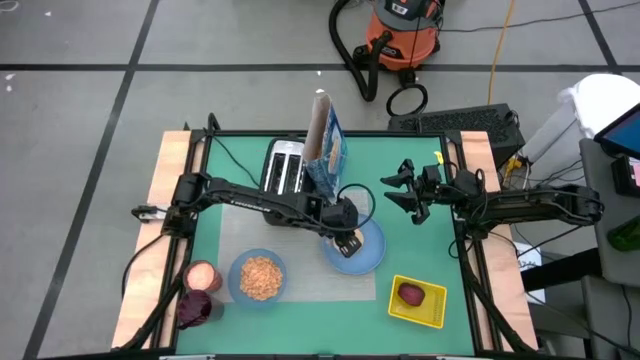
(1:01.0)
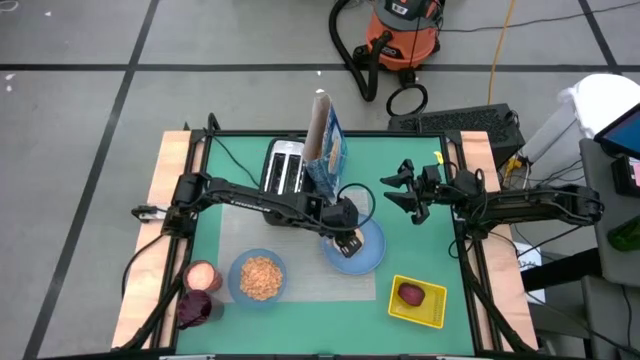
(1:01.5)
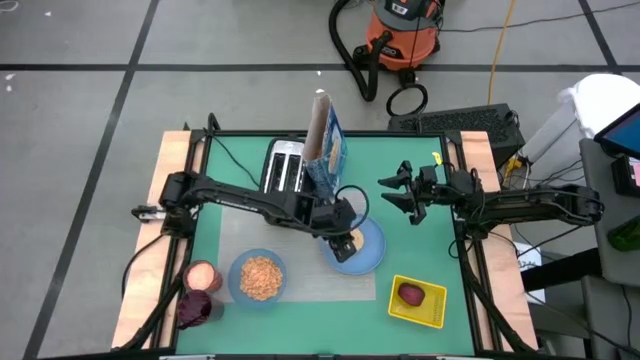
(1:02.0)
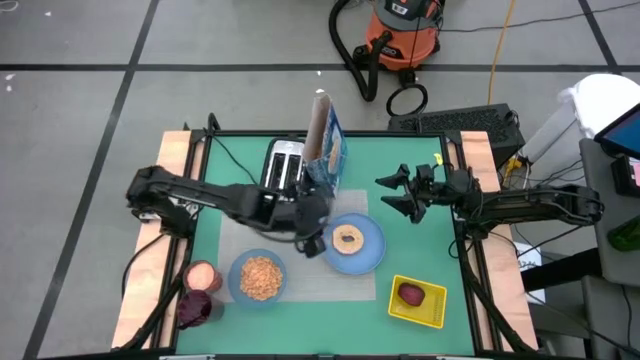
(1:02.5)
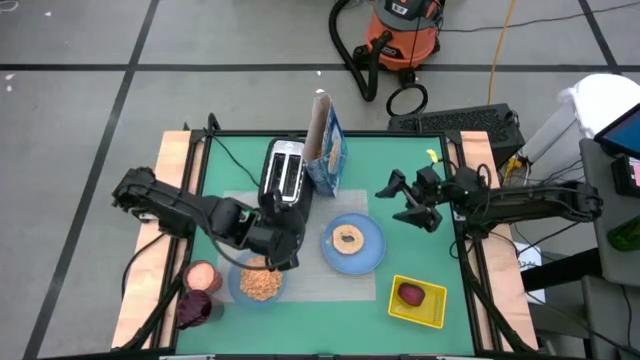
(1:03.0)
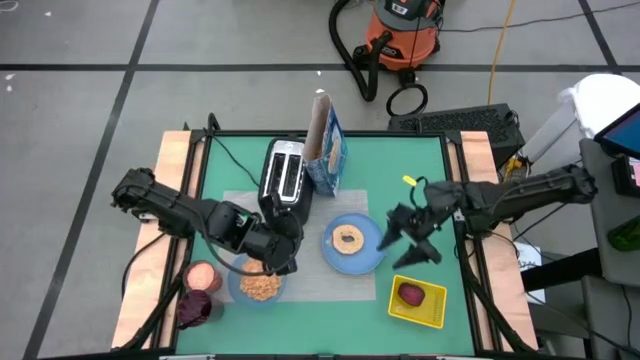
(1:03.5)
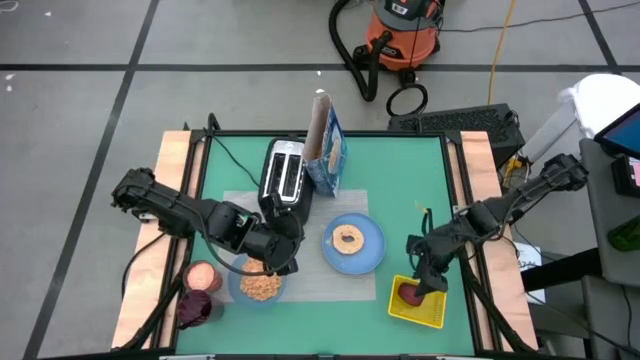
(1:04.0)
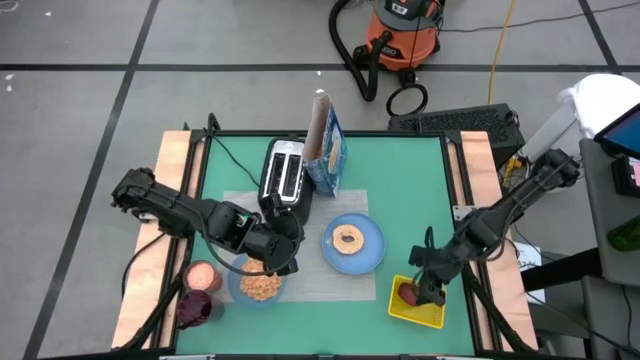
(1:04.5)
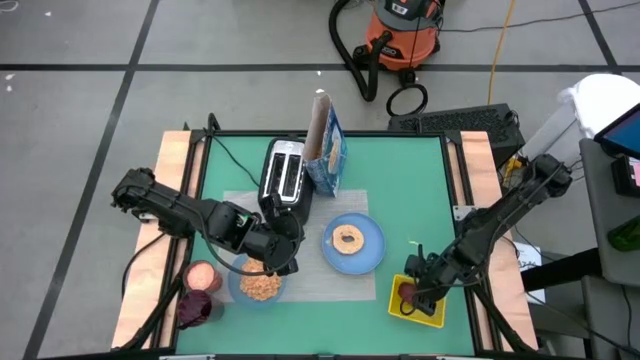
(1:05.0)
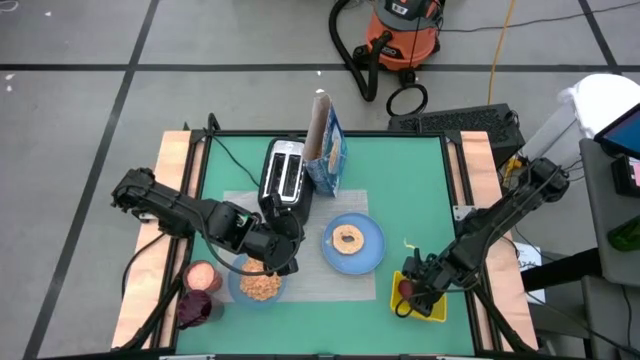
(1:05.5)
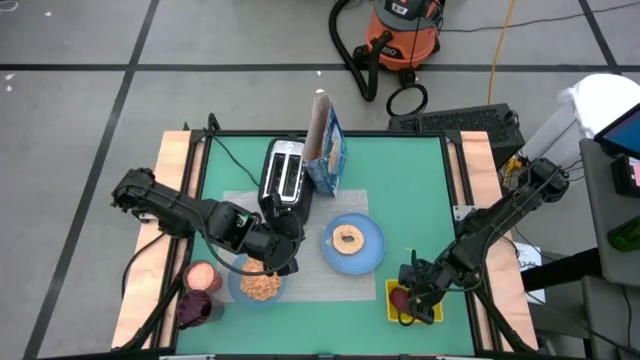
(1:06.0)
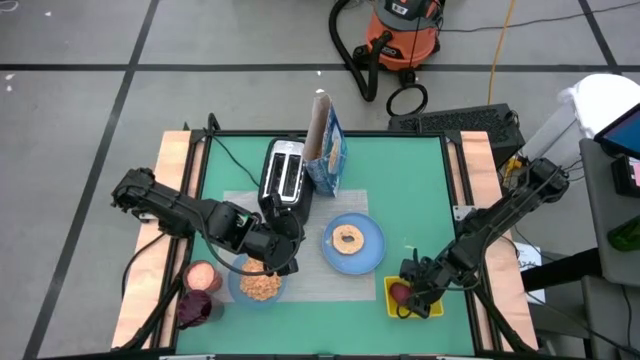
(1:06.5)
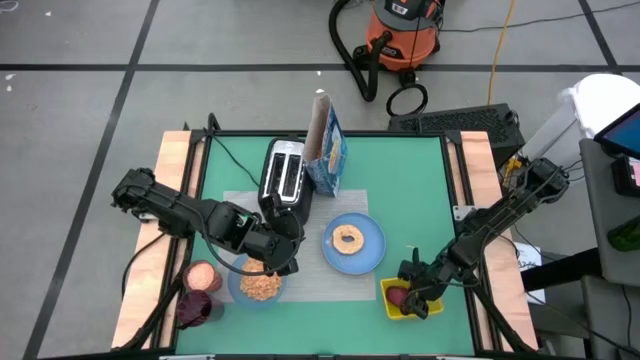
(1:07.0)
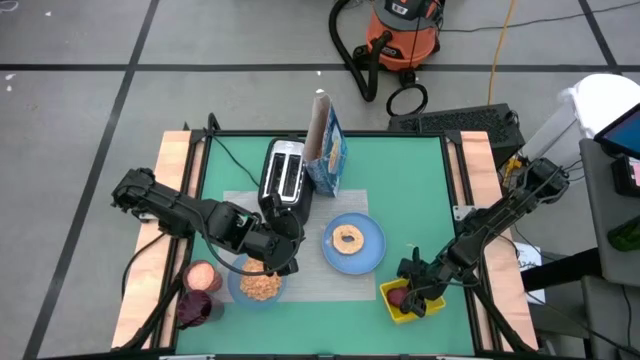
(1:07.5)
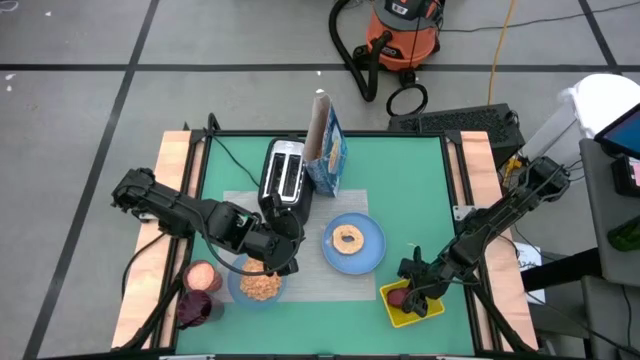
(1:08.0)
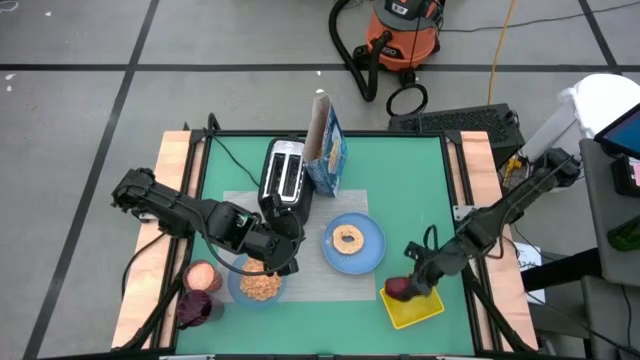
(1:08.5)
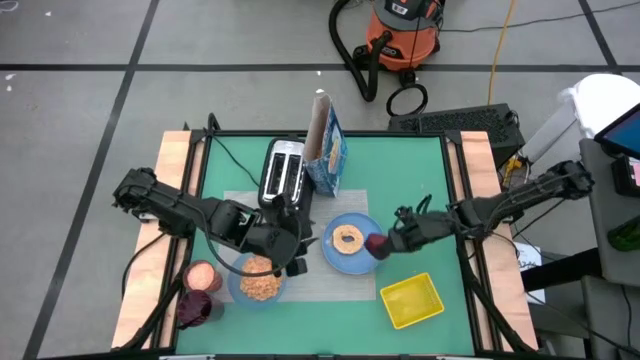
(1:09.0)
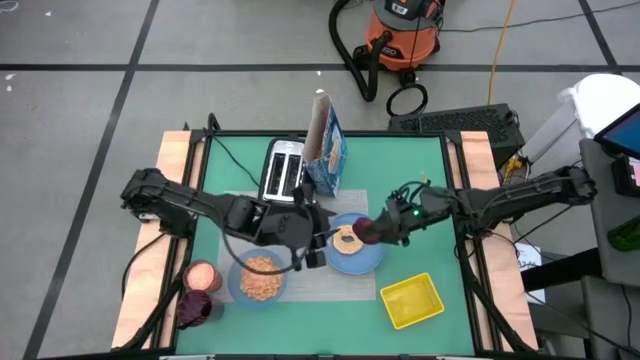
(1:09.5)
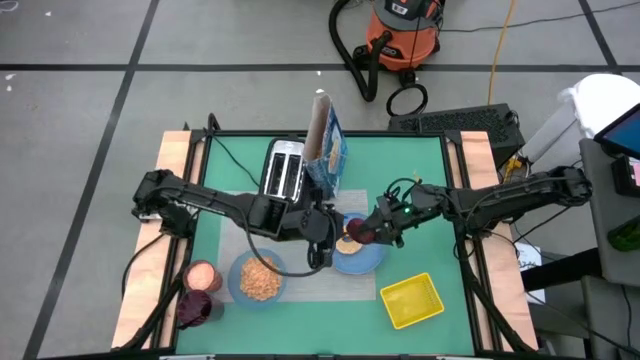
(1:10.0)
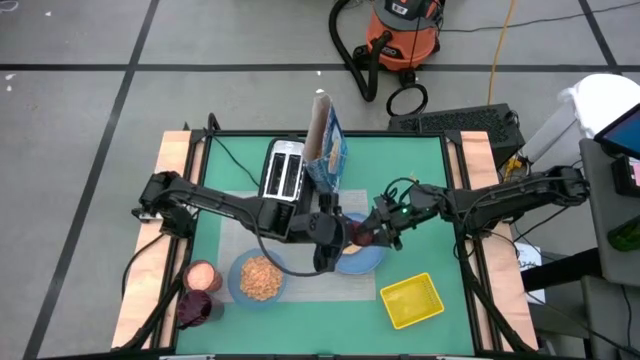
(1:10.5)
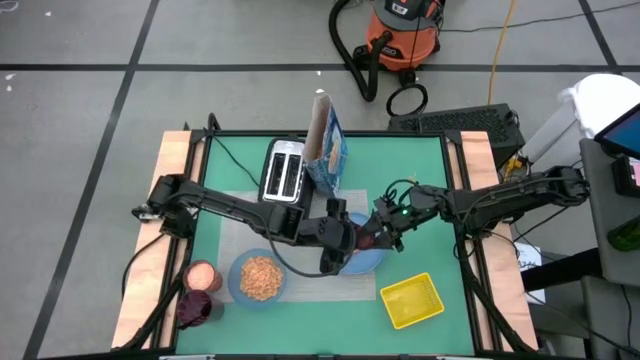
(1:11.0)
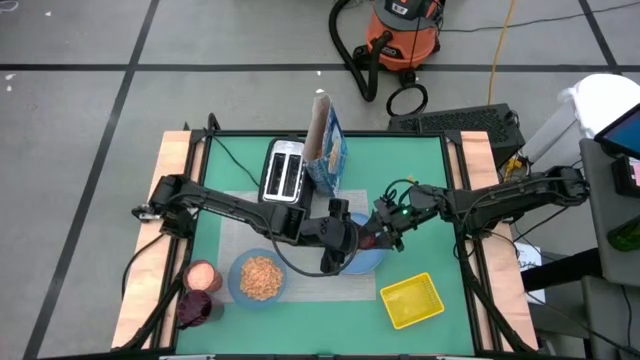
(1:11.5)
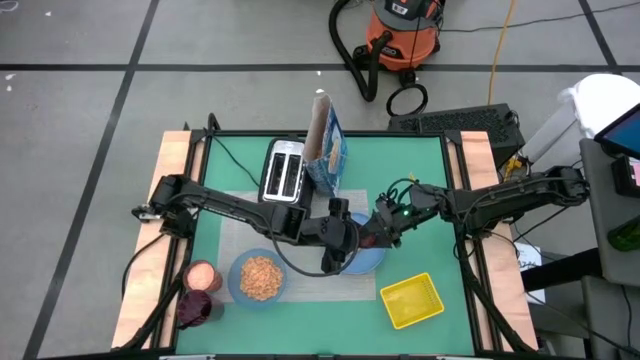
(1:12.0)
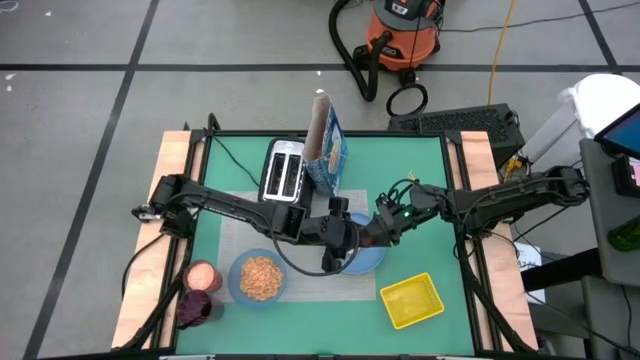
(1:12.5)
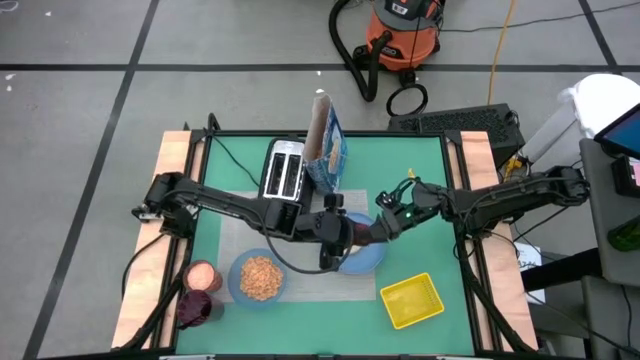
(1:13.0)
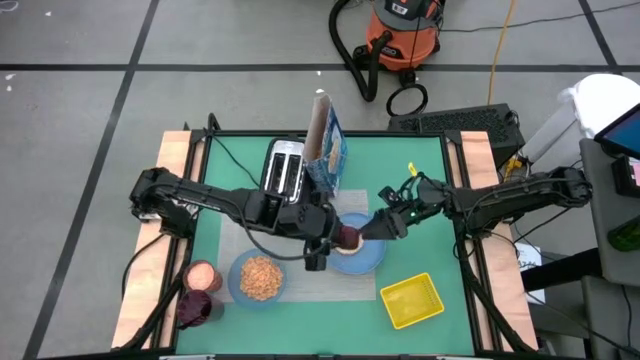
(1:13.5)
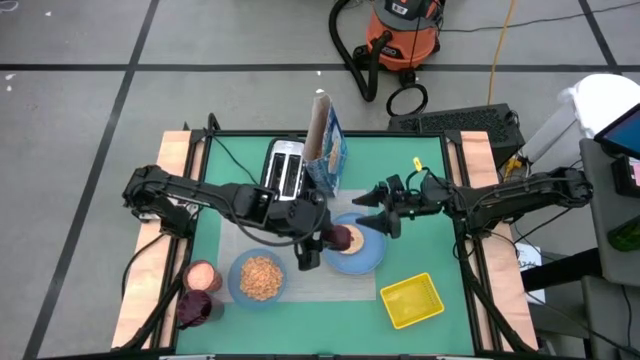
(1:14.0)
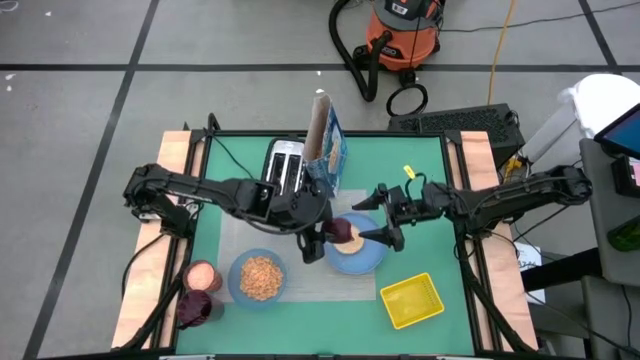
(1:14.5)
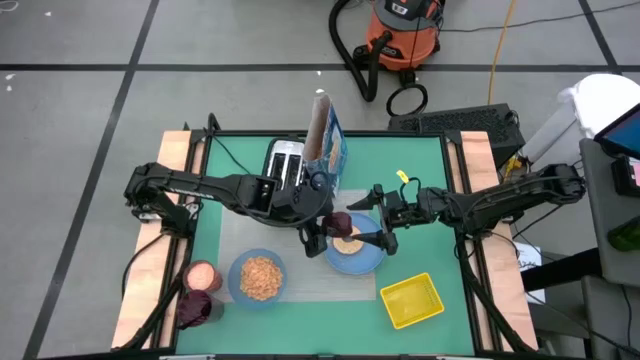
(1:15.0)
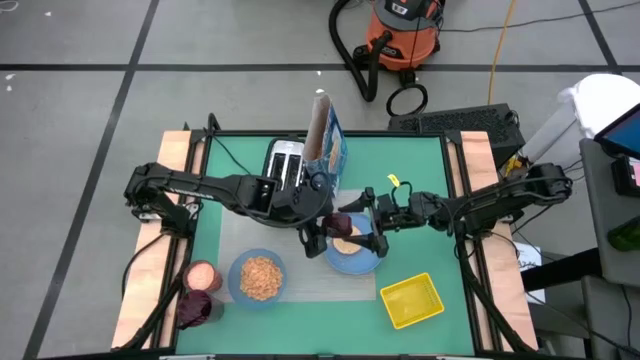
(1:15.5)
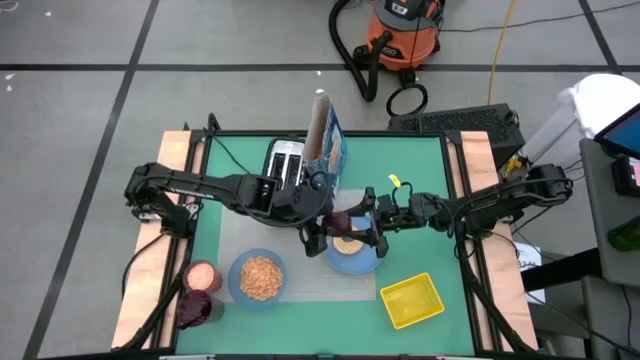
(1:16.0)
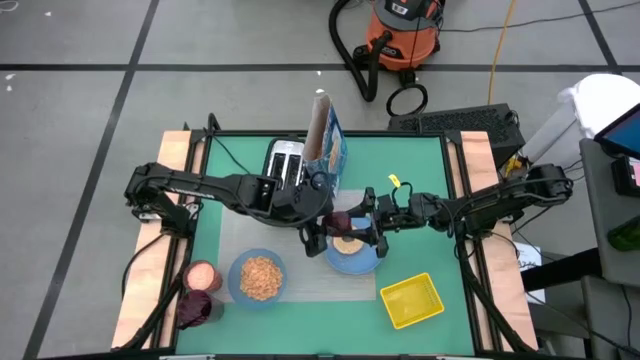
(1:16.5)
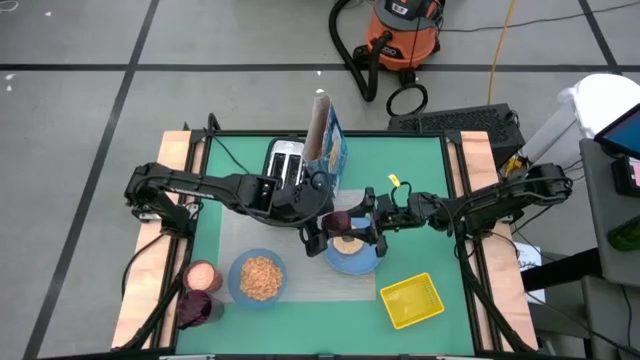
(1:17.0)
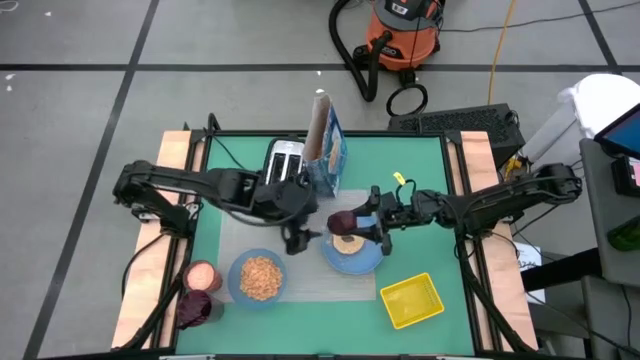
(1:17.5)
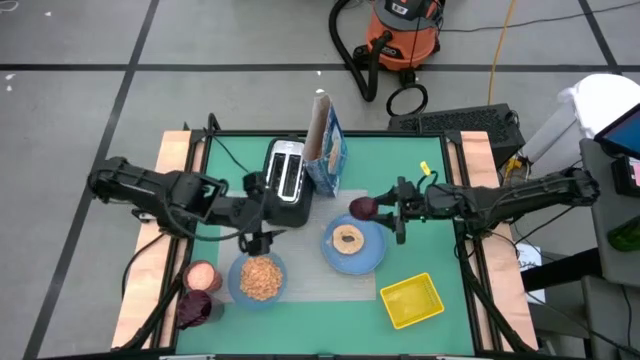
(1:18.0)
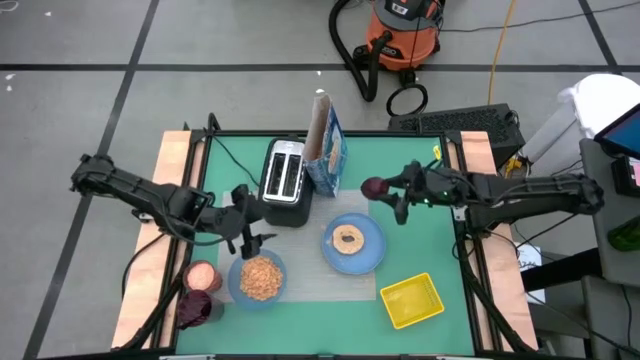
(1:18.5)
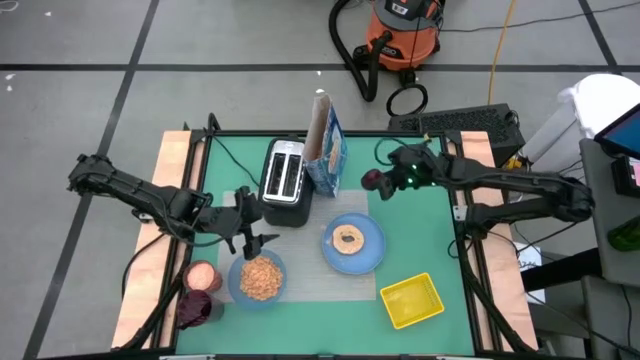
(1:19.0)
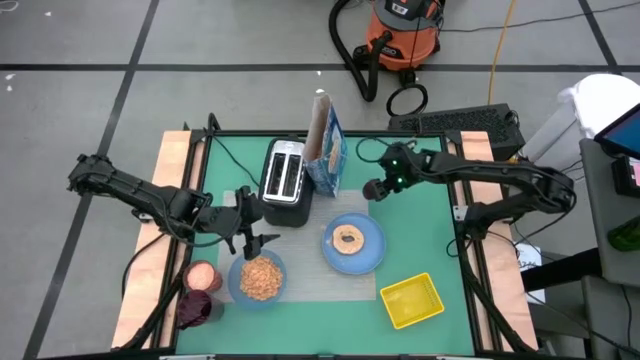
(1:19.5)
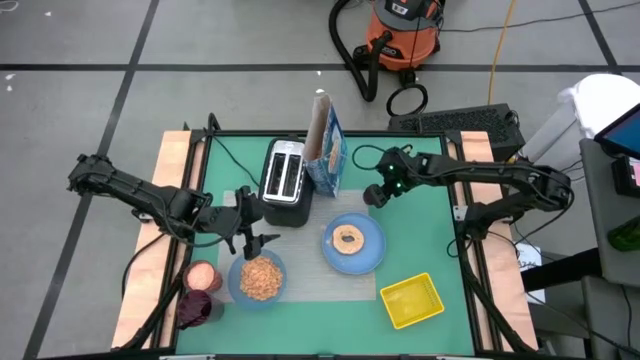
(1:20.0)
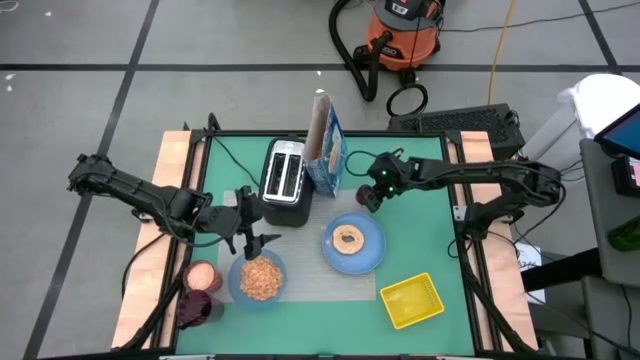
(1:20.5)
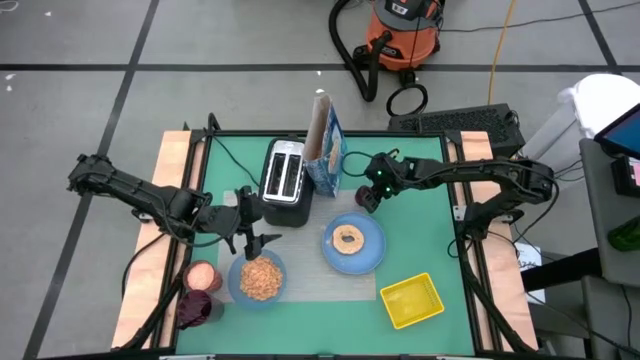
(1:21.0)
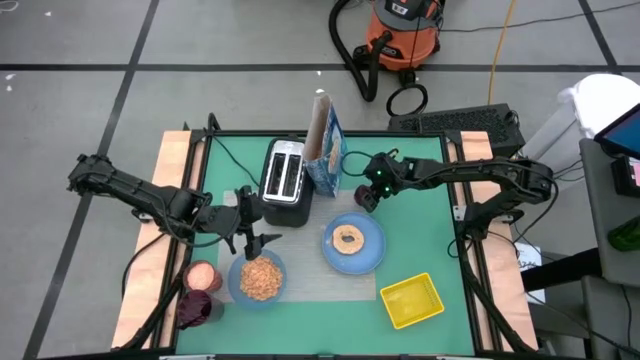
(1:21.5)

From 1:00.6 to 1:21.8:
Task: Arrange a breakfast setting
Put the apple on the top of the mat
